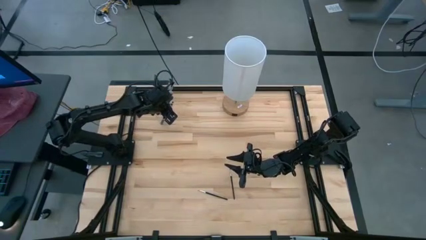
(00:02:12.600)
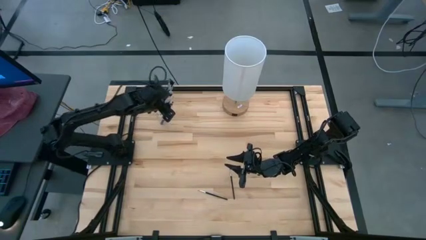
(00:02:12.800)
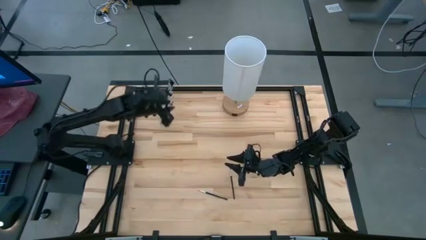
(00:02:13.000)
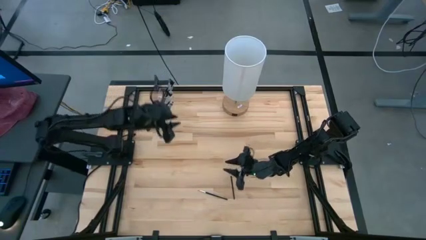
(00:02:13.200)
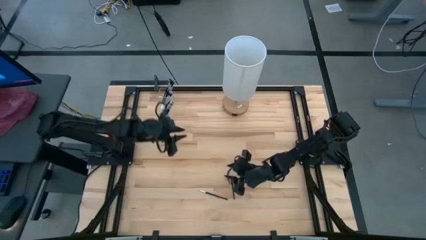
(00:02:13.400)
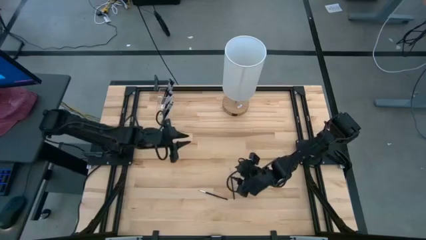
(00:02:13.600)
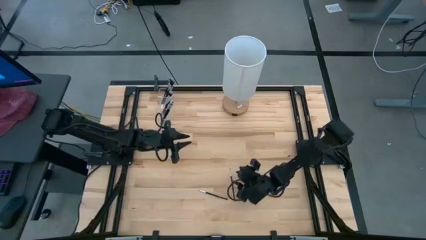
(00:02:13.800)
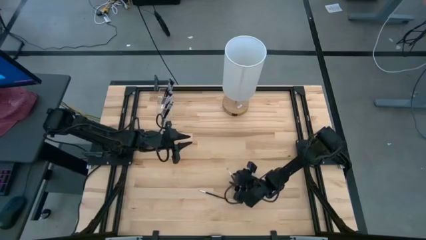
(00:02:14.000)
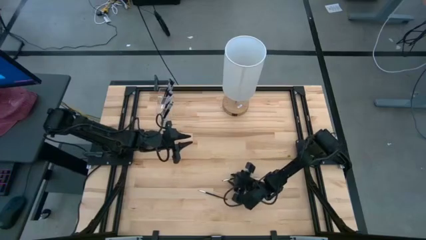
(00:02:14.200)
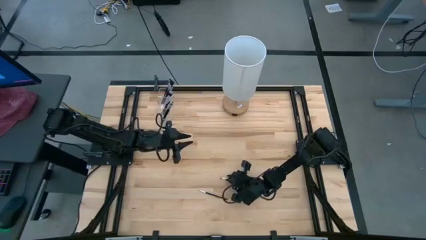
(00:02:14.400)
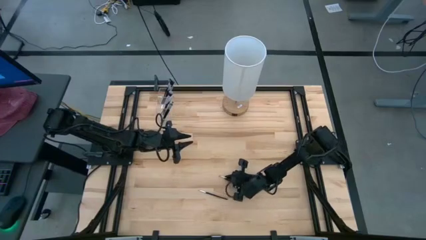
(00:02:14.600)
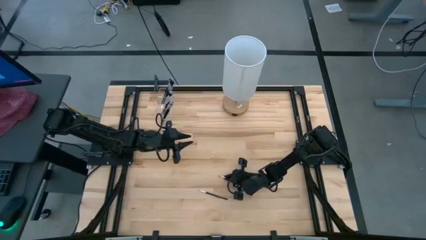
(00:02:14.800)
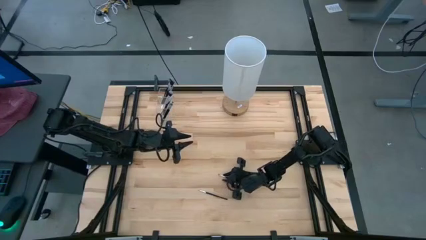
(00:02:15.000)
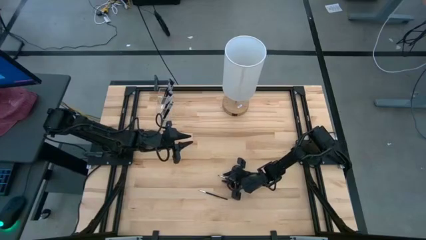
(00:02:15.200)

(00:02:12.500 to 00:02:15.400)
Task: Put items in baskets/containers
Put the black eyeshadow brush into the transparent organizer

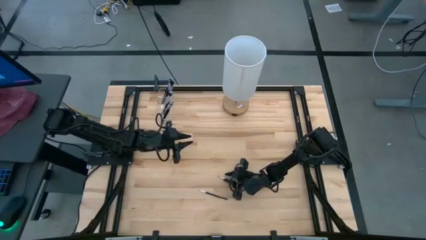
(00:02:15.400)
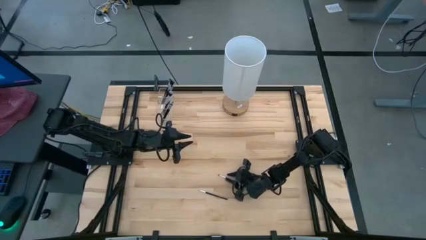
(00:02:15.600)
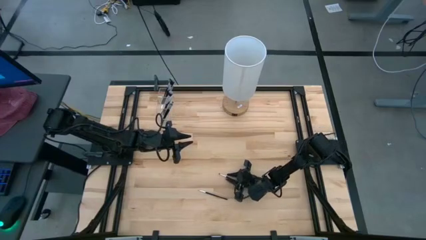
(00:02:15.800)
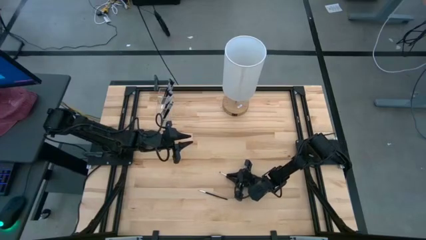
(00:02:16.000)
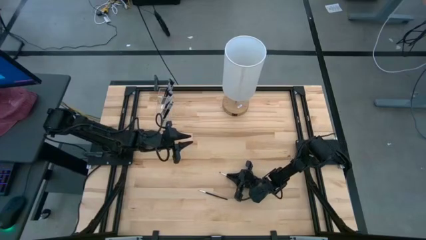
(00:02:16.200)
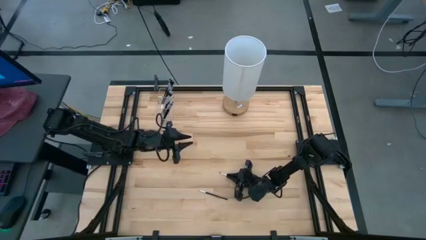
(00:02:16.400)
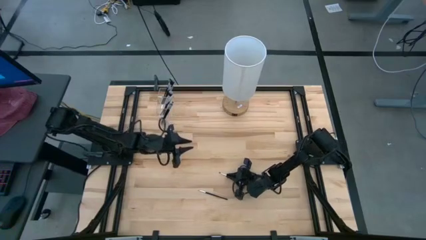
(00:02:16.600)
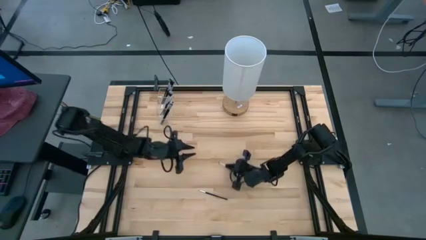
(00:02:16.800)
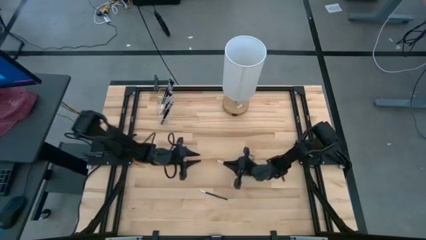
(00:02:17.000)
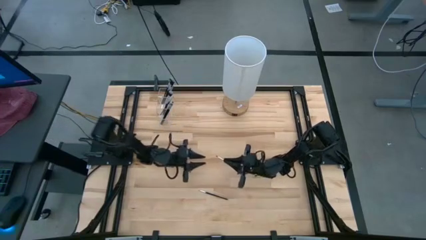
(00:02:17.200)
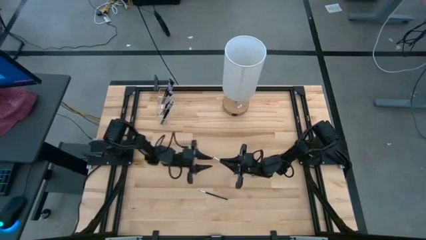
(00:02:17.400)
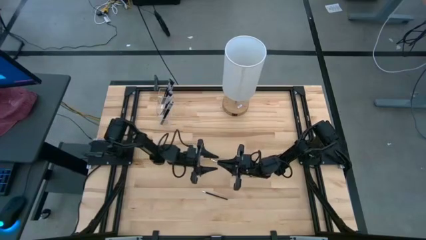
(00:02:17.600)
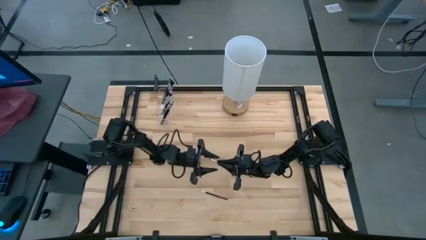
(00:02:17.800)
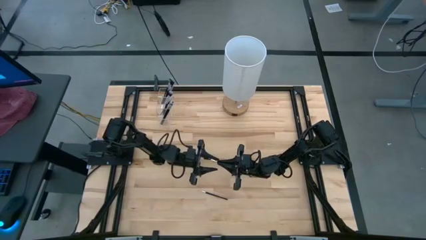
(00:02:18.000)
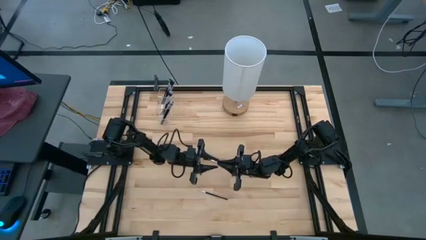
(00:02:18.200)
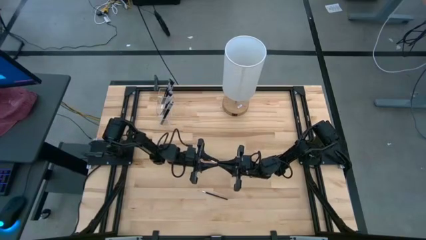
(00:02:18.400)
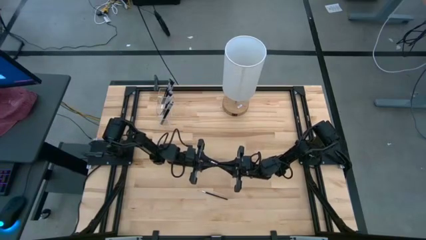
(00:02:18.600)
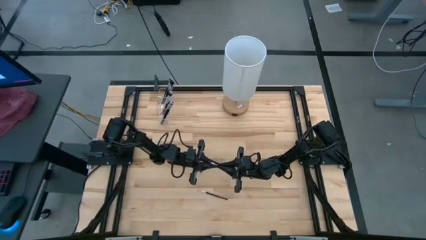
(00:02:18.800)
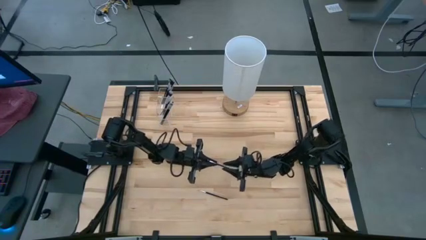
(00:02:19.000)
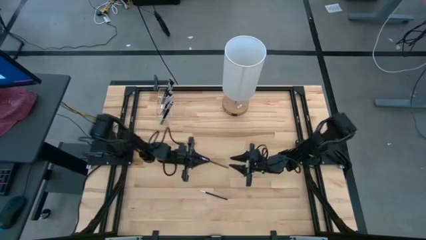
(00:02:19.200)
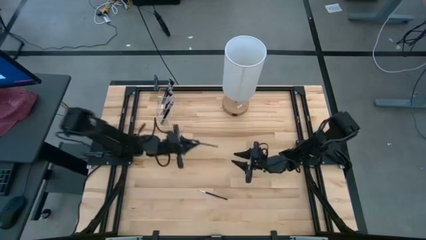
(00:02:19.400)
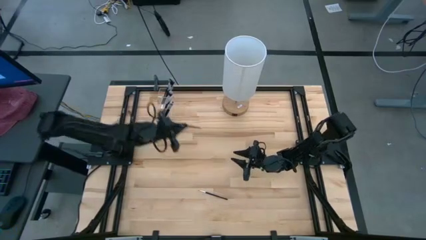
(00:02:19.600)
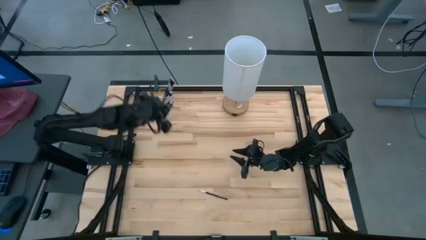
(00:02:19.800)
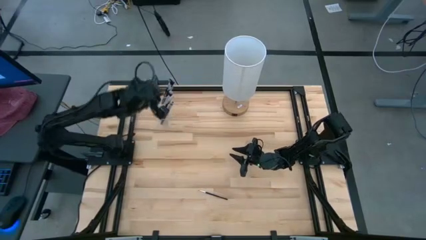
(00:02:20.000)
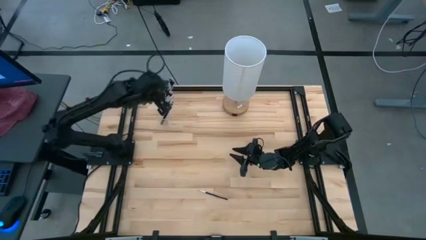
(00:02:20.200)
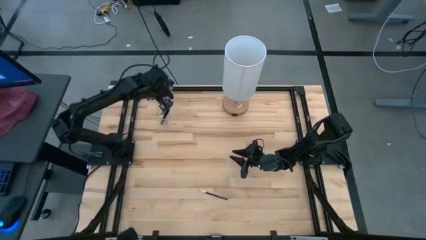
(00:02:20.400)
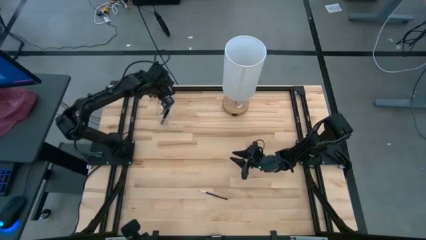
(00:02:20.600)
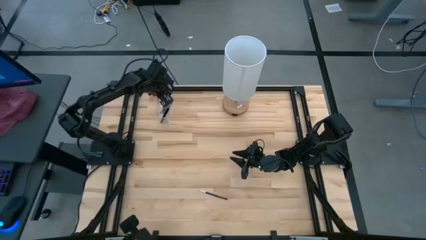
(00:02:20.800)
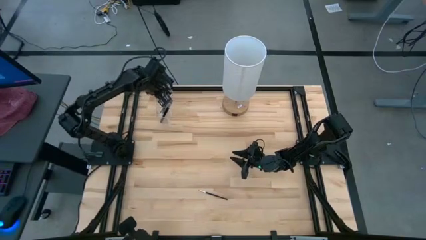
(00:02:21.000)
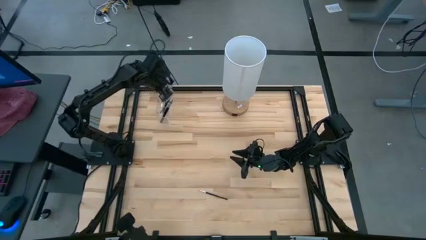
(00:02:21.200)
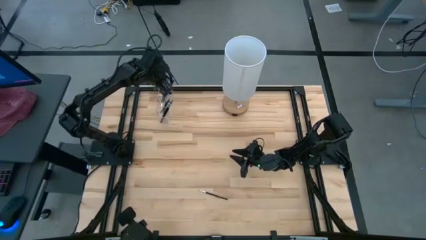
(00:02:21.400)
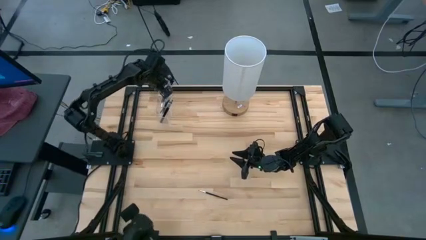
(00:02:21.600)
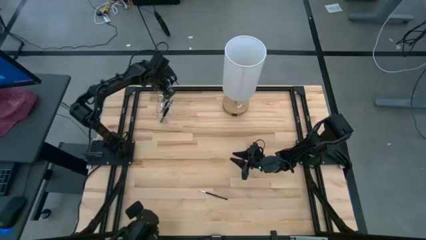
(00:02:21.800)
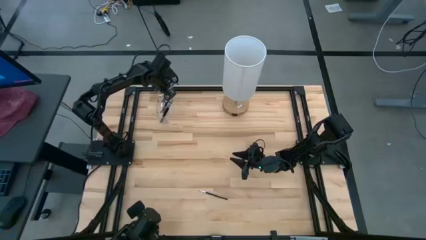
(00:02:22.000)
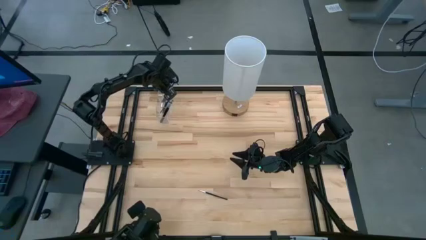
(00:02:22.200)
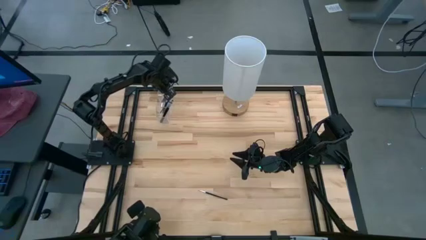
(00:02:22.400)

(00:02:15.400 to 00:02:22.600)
Put the black eyeshadow brush into the transparent organizer

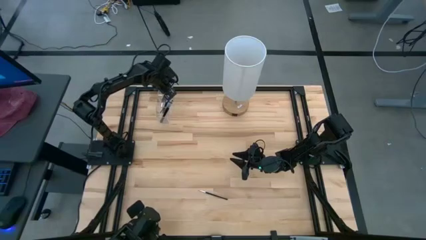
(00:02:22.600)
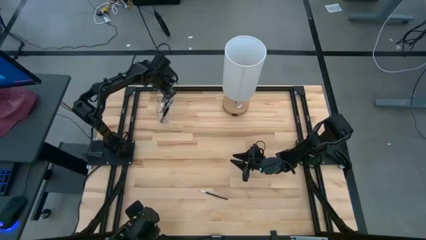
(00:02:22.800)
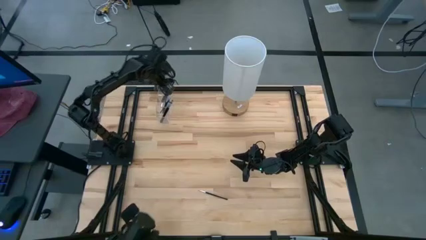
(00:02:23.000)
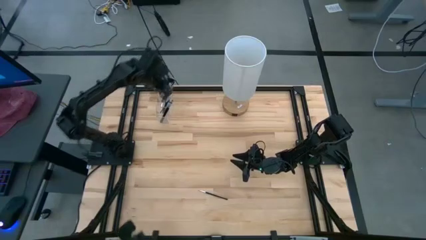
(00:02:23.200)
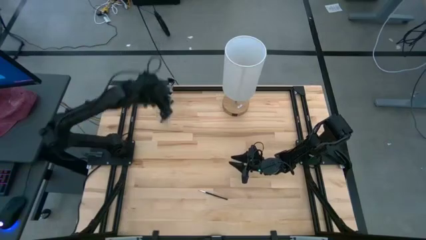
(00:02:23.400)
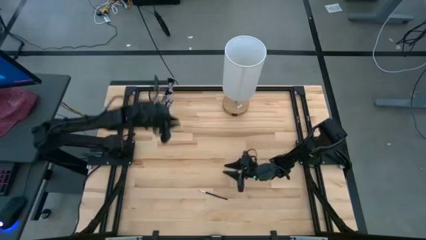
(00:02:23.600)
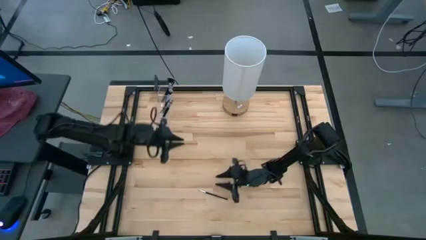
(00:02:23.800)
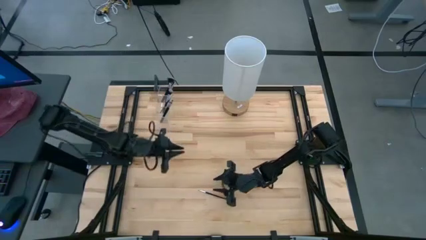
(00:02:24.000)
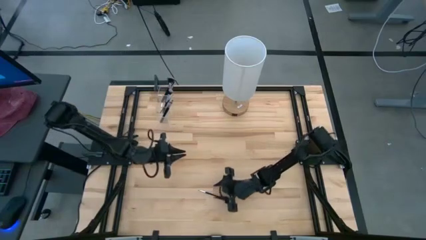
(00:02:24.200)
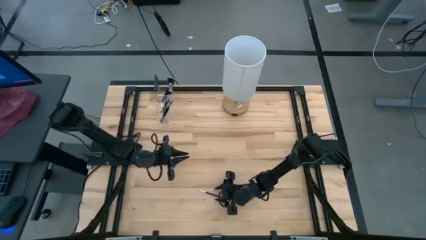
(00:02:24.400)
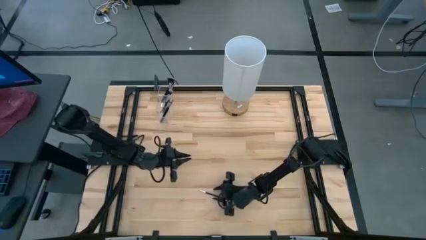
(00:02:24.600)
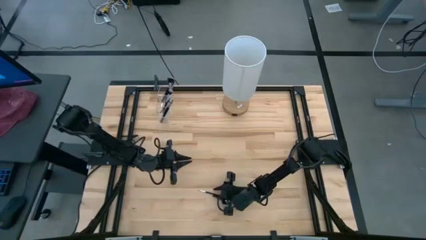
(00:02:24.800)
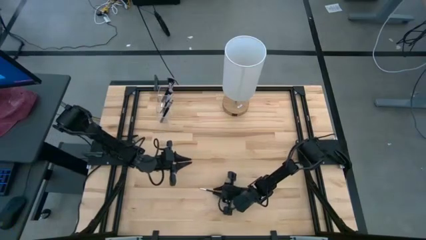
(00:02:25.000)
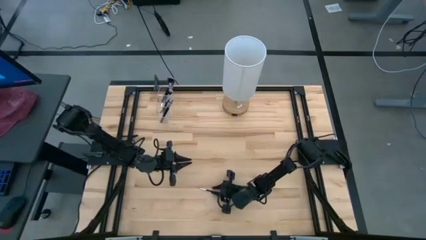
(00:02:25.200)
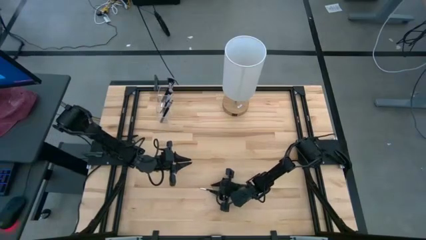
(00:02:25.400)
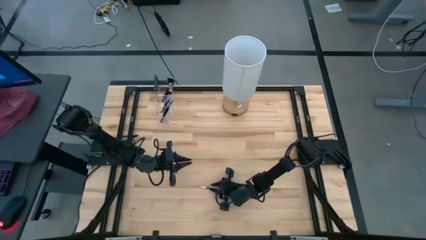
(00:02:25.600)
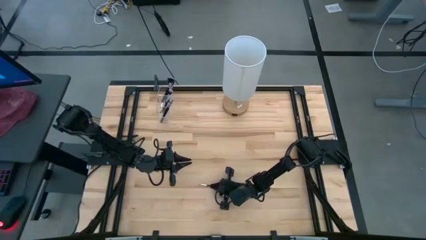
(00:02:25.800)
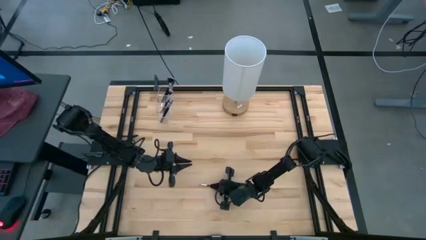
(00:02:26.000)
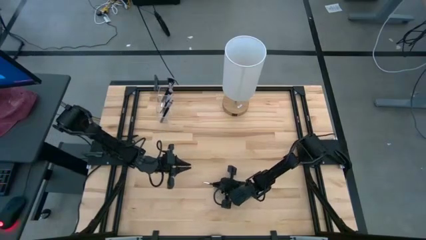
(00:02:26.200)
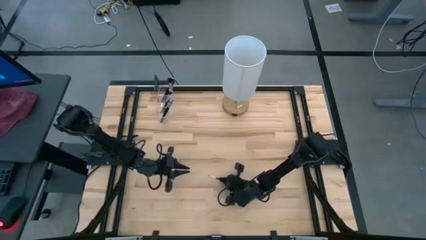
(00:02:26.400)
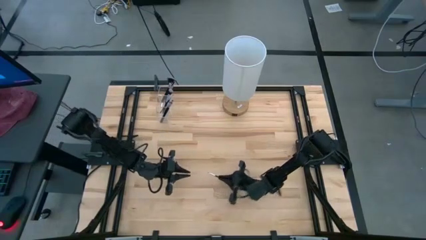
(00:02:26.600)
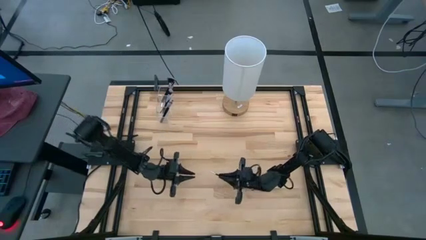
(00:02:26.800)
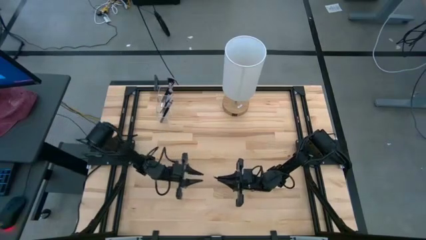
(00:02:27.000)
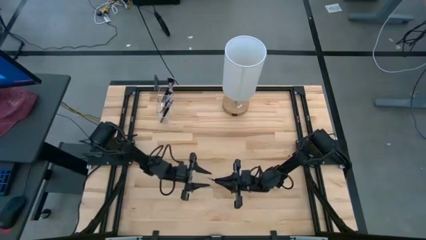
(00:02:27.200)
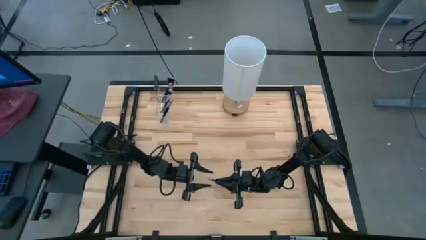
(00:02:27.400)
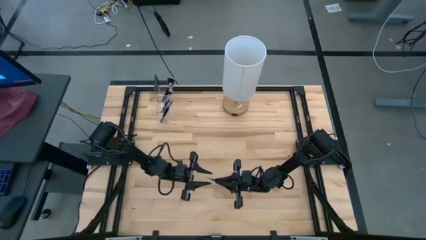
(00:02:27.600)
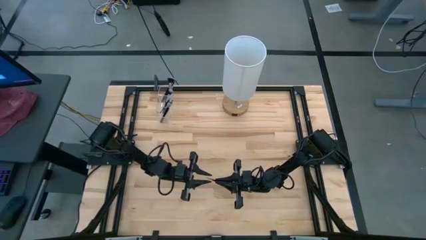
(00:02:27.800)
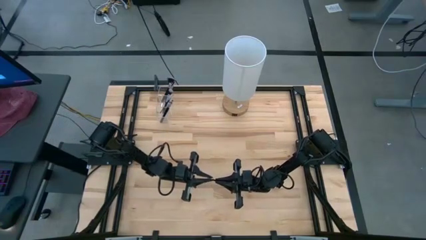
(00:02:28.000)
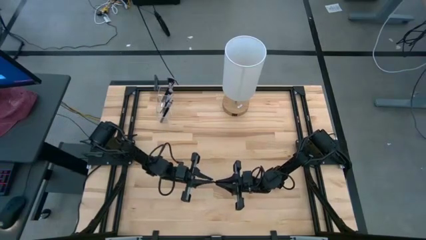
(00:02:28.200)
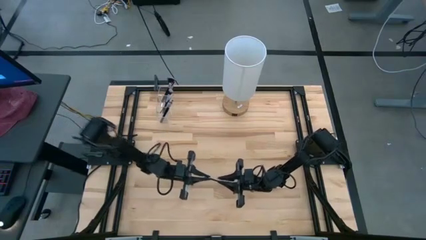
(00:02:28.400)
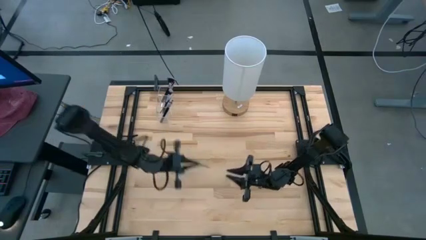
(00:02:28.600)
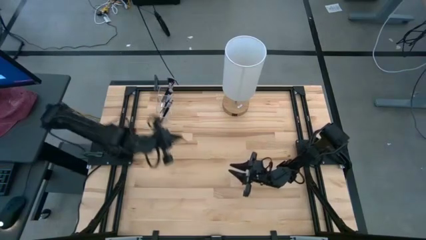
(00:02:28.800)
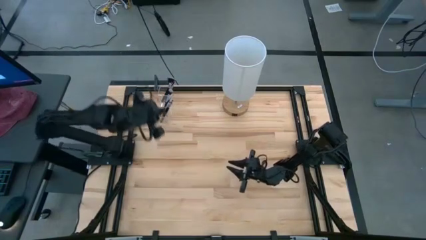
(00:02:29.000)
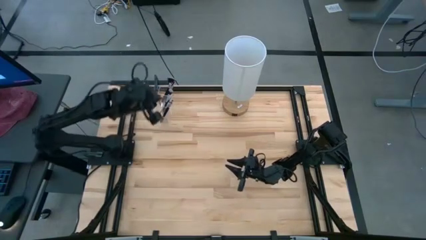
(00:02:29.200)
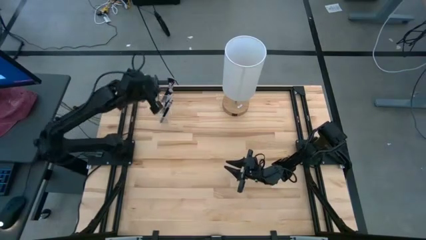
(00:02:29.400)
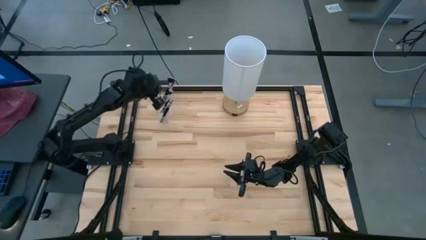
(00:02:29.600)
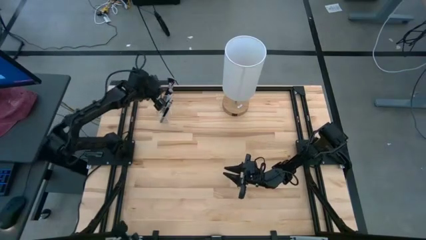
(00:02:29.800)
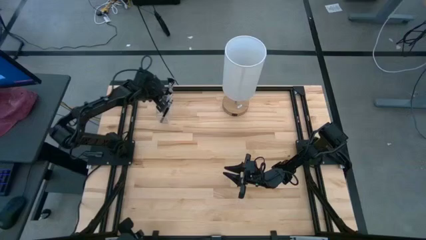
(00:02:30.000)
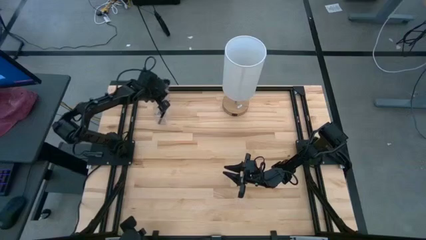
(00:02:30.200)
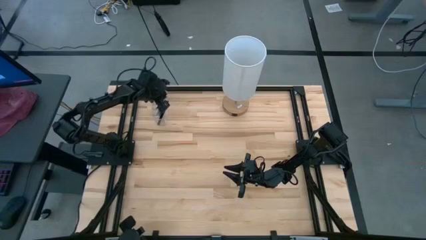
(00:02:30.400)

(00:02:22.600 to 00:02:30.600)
Put the black liner brush into the transparent organizer
